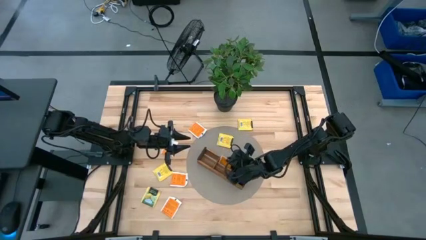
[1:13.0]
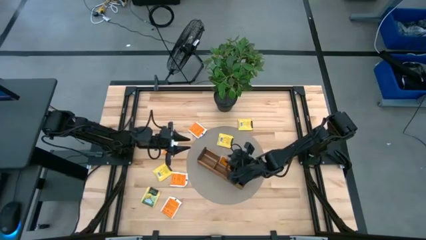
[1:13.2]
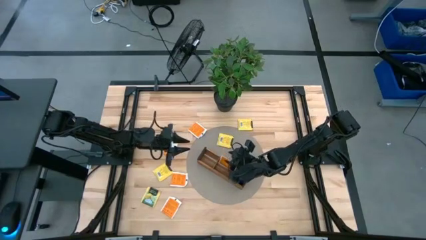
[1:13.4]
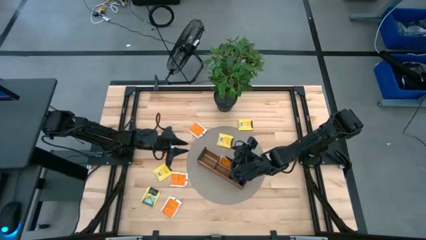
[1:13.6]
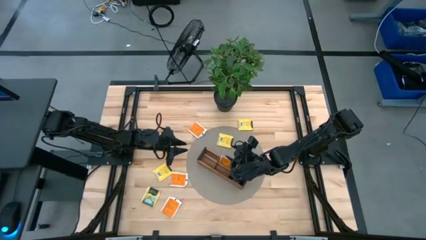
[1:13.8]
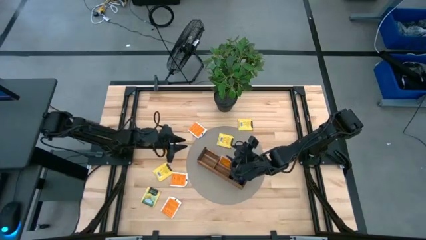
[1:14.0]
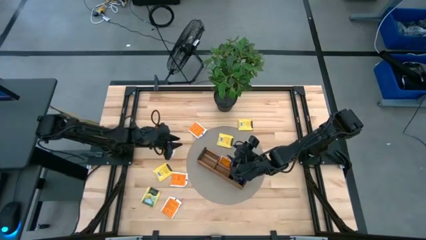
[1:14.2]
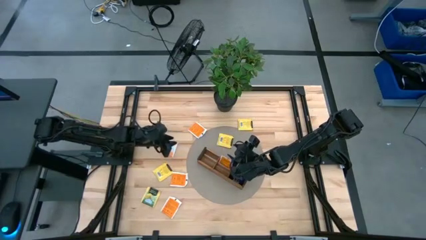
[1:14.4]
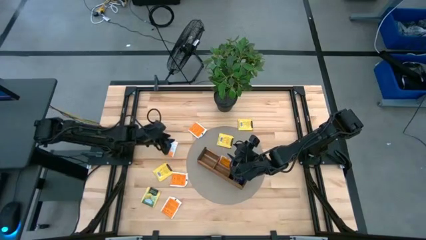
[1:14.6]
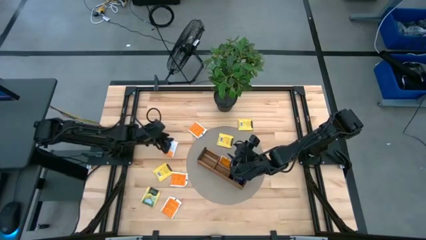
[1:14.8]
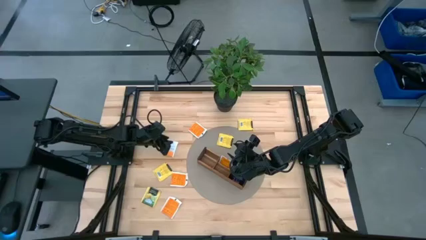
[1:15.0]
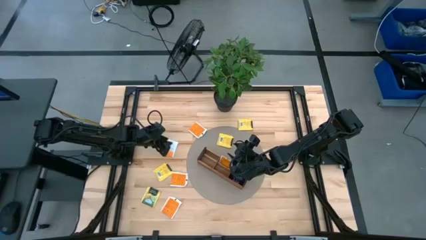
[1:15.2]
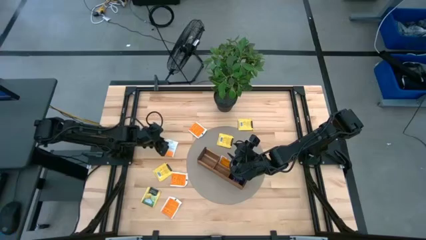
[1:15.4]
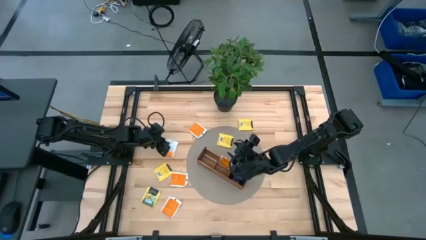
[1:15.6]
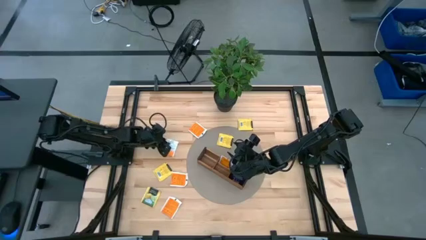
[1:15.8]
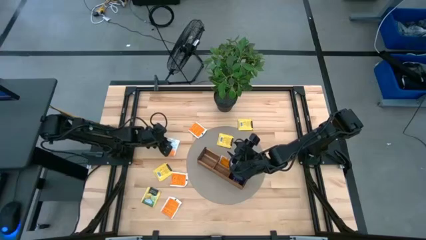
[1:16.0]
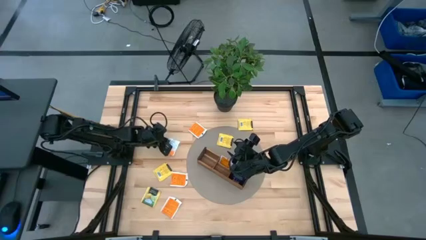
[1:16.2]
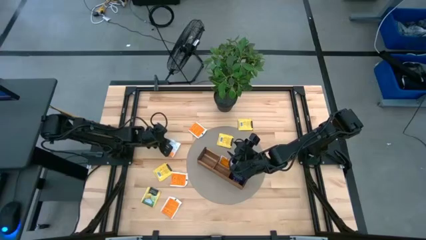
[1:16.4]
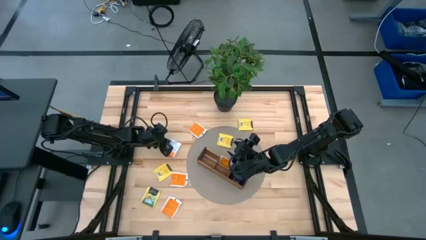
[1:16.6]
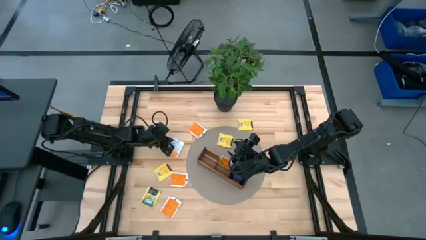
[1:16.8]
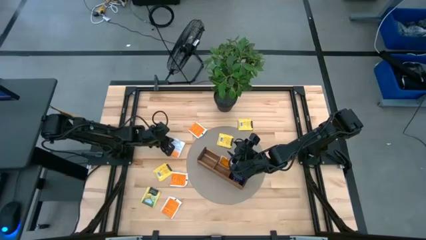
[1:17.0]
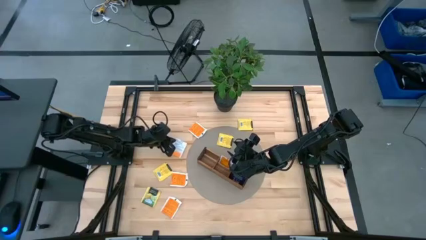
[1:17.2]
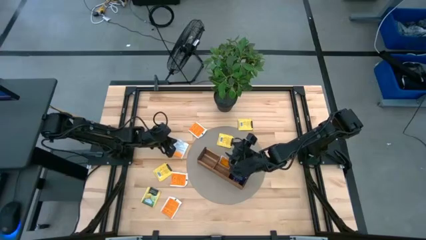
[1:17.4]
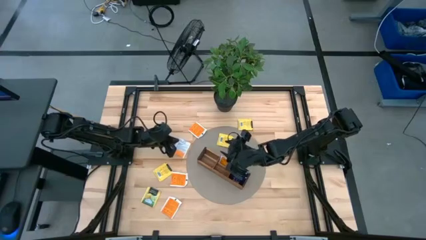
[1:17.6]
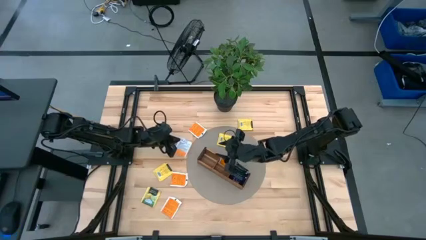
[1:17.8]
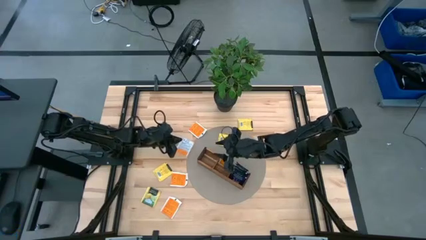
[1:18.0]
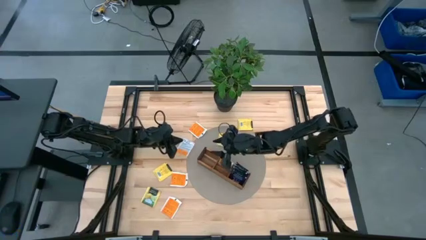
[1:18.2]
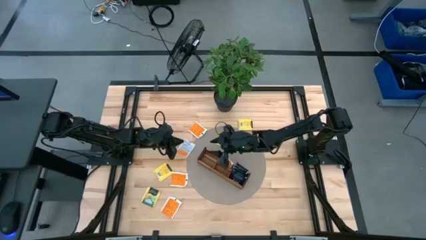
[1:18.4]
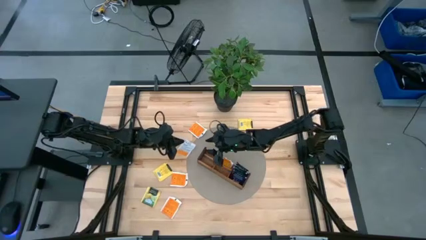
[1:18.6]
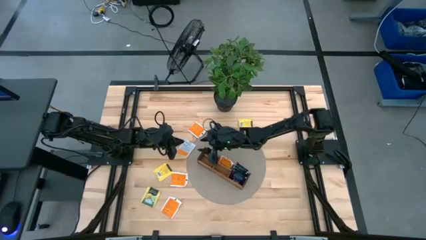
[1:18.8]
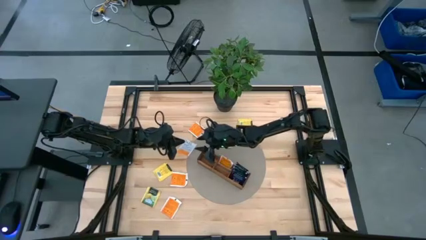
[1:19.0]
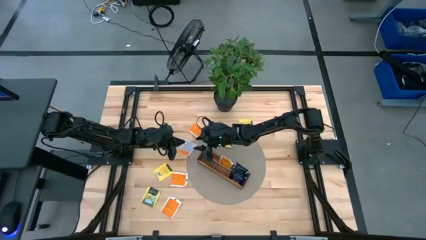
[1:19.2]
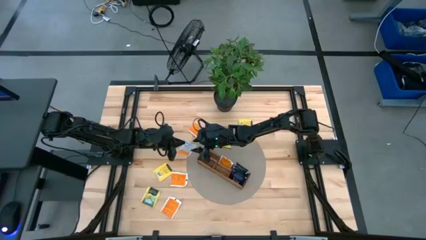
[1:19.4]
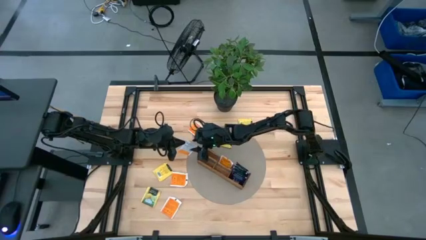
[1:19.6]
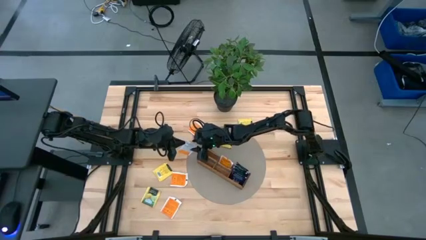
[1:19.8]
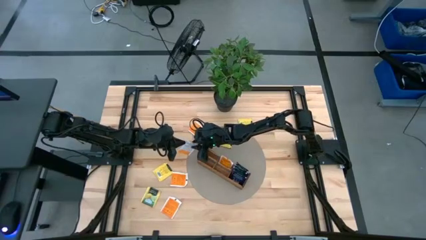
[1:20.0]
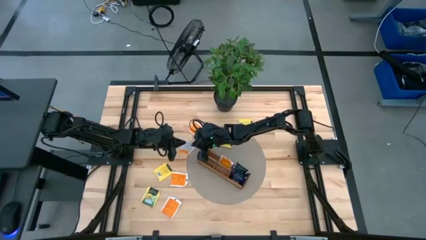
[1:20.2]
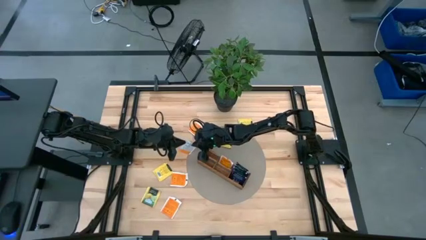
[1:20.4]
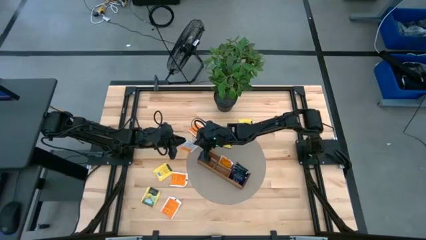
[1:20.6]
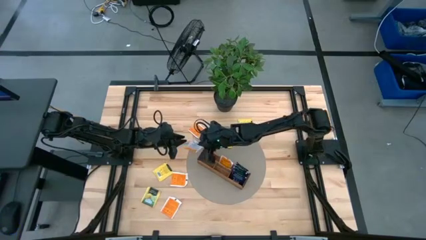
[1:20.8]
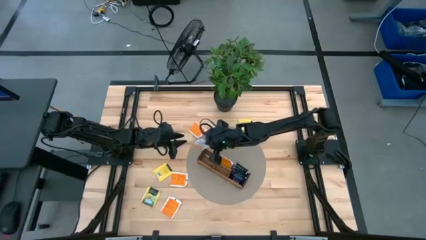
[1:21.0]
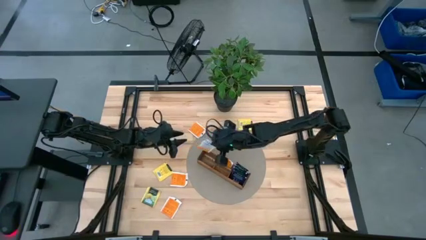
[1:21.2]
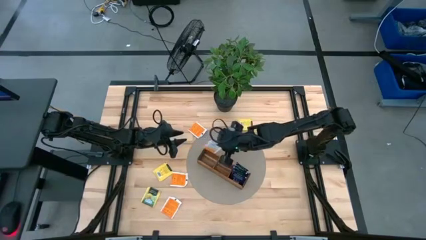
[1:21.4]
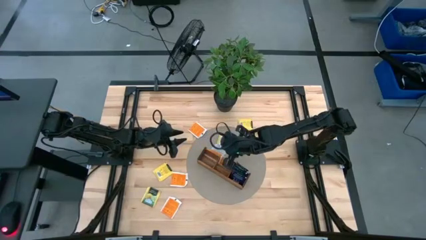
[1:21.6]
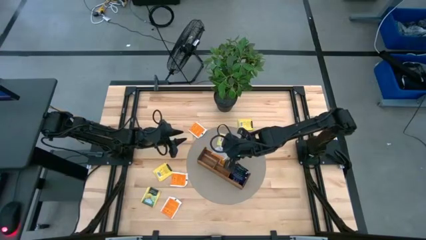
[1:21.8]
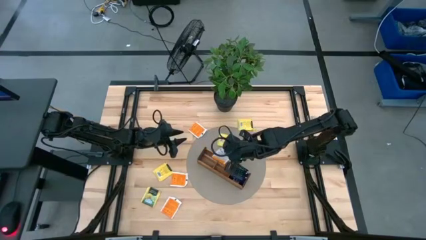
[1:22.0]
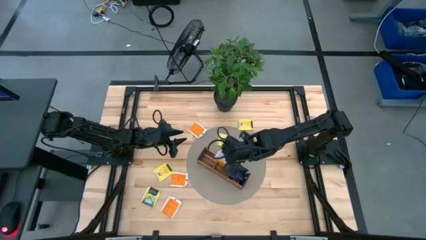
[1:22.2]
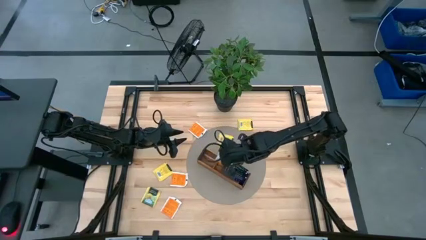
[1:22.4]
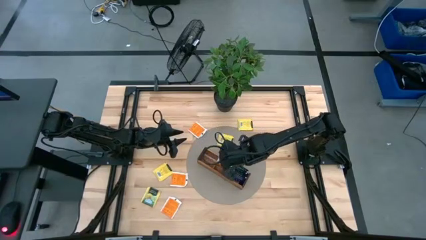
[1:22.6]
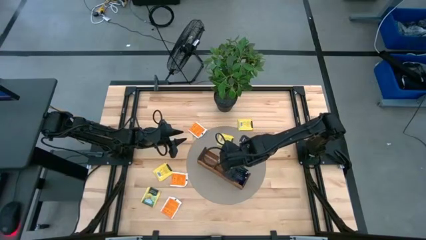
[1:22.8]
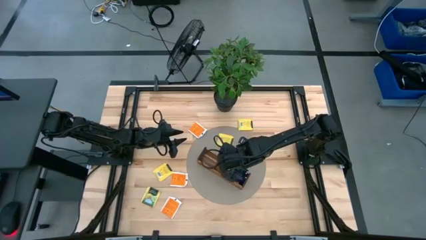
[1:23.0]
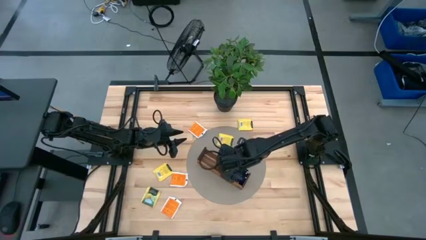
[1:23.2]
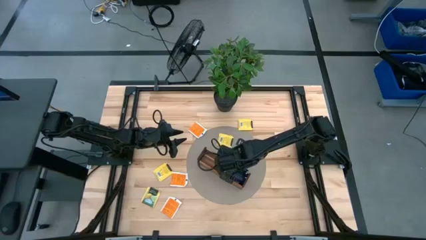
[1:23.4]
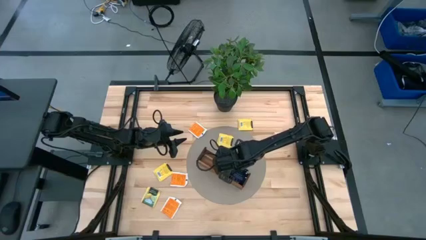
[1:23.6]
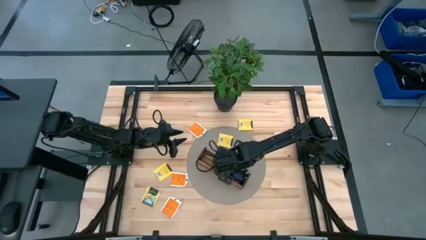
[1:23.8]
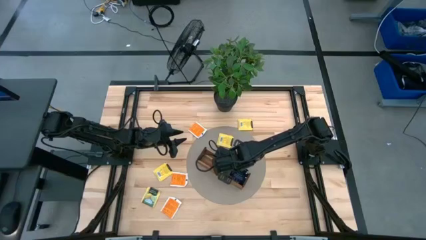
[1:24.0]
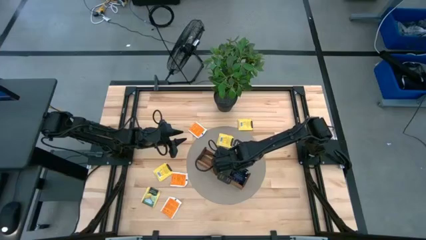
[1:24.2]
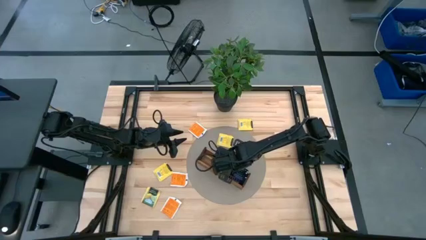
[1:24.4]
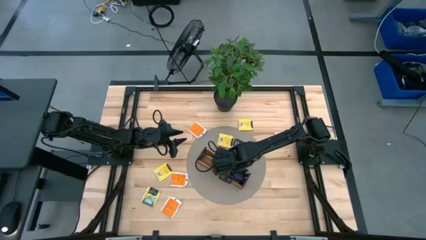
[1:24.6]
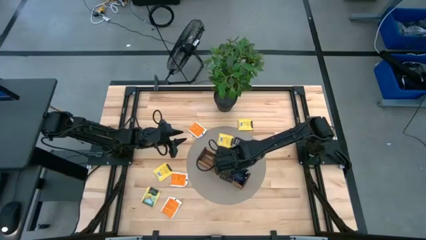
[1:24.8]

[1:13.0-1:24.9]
Task: Pick & Place Tea
Put the orange tea bag into the middle section of the wooden organizer

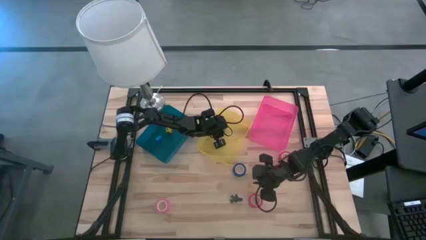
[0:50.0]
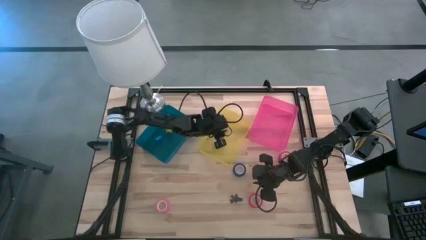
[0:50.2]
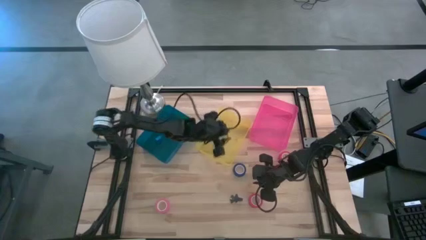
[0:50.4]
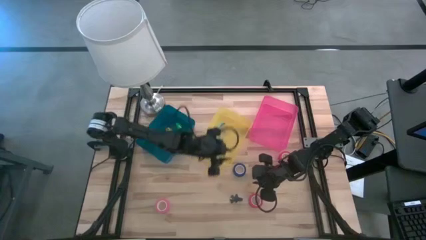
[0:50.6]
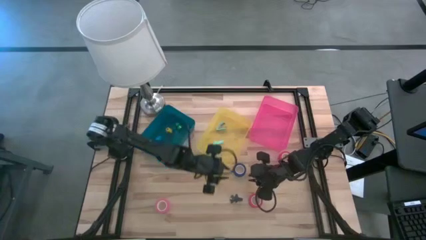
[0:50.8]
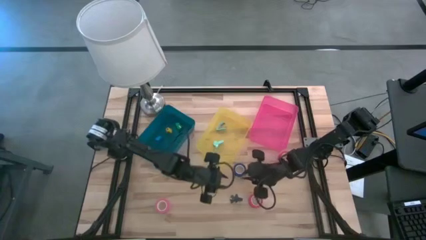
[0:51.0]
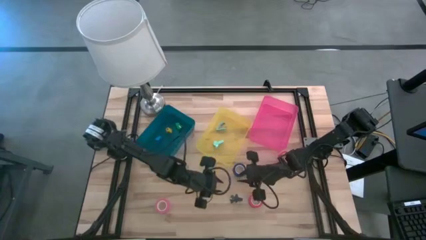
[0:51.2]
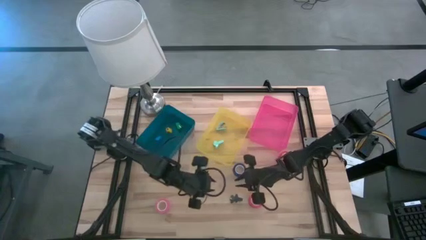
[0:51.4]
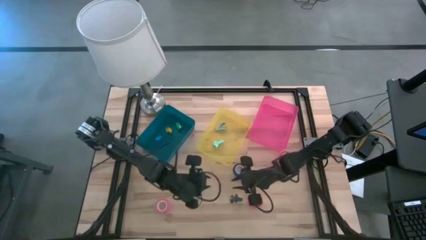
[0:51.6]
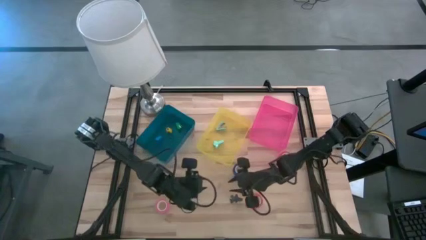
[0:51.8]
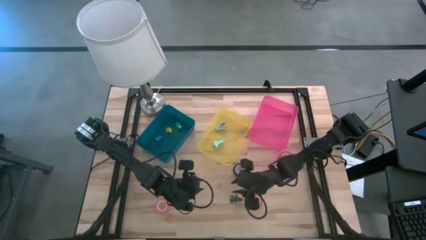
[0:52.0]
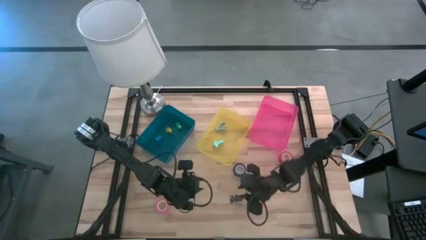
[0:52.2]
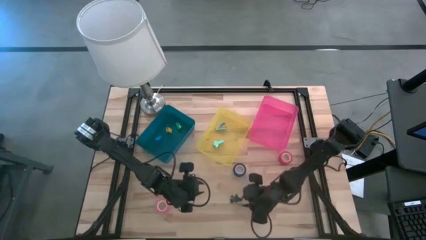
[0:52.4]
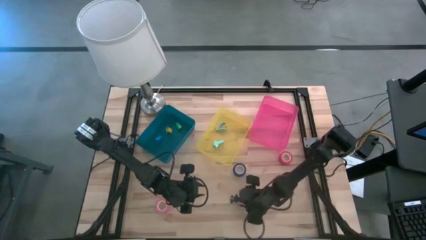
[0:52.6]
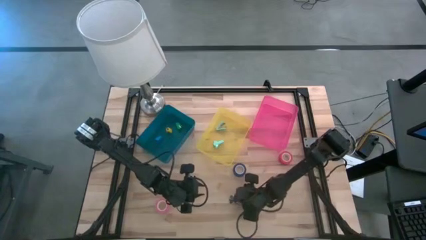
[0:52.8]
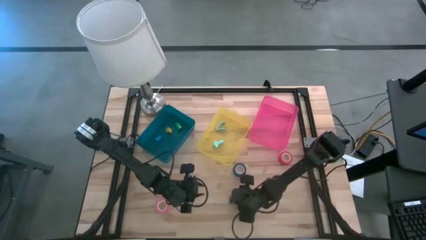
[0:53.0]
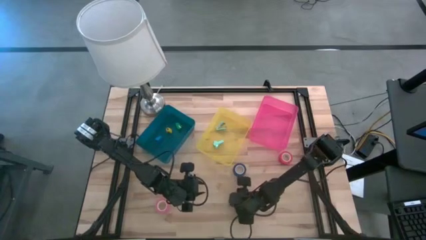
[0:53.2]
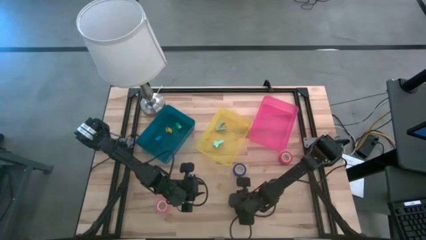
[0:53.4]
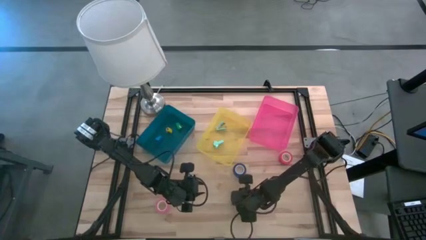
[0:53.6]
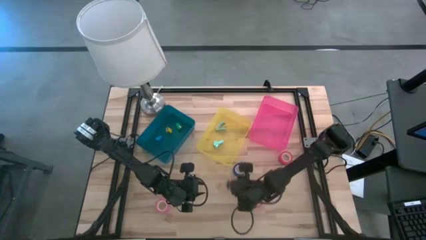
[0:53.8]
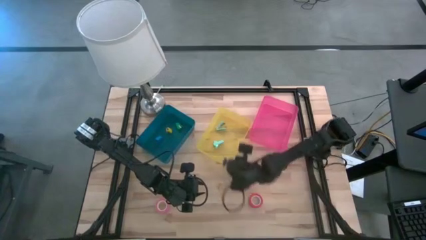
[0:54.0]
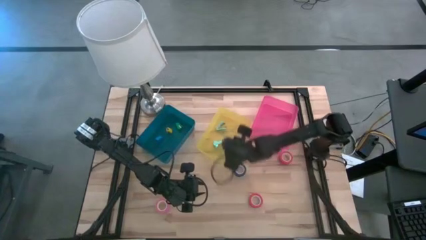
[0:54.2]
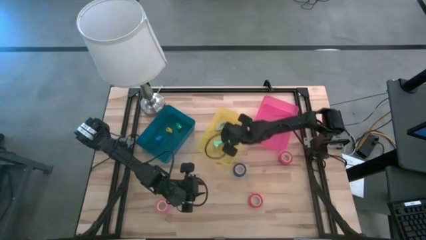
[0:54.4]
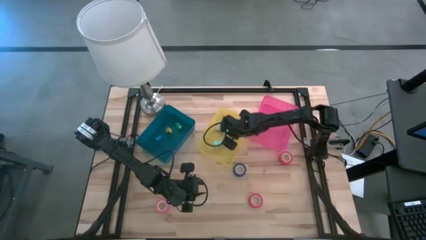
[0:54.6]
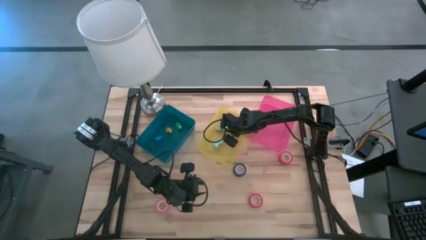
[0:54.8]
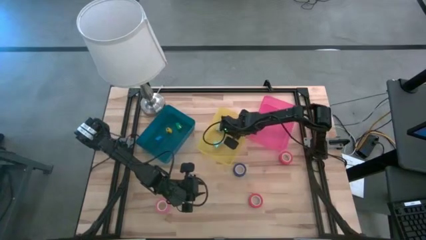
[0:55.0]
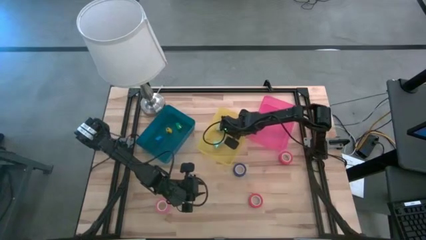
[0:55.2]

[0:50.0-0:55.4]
Task: Pick and place Stapler, Stapler remover, tape
Put the black staple remover into the yellow bin
